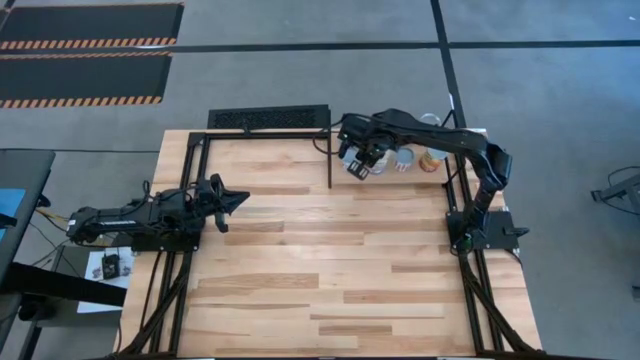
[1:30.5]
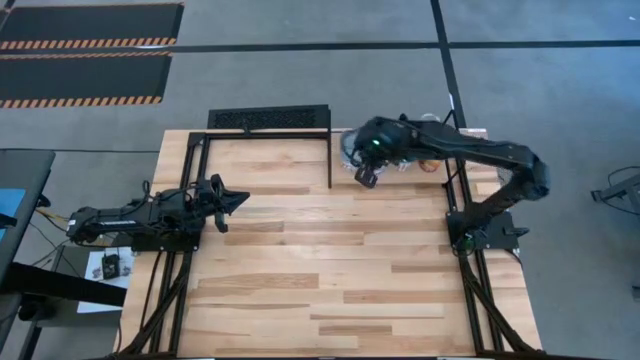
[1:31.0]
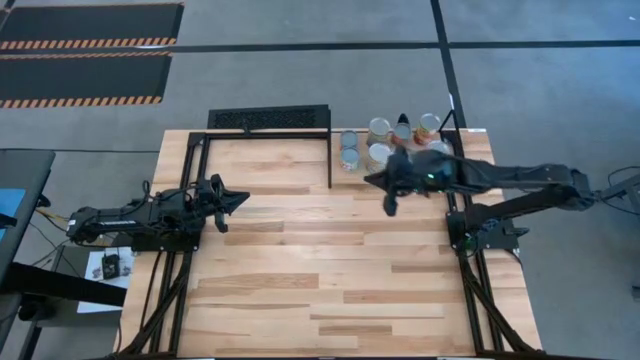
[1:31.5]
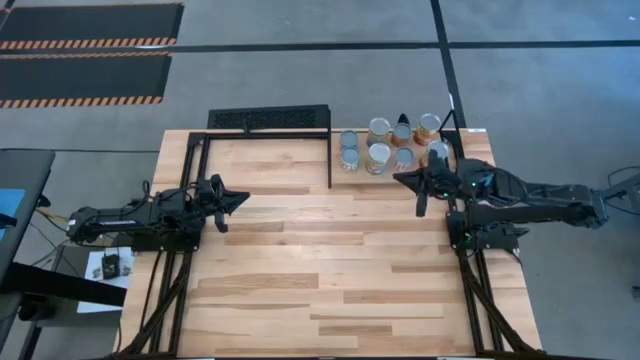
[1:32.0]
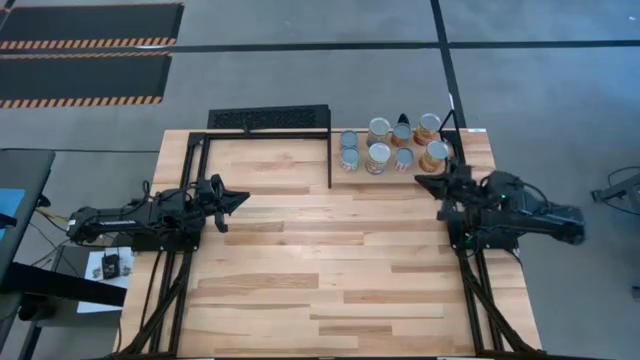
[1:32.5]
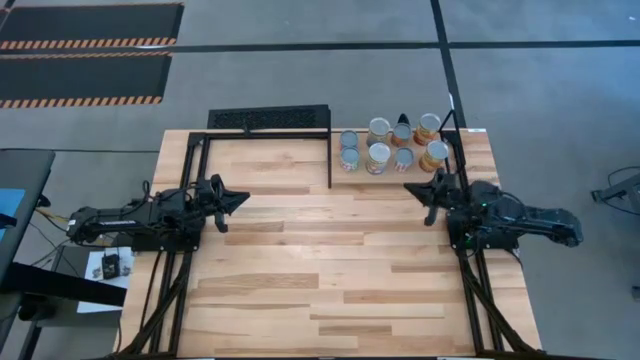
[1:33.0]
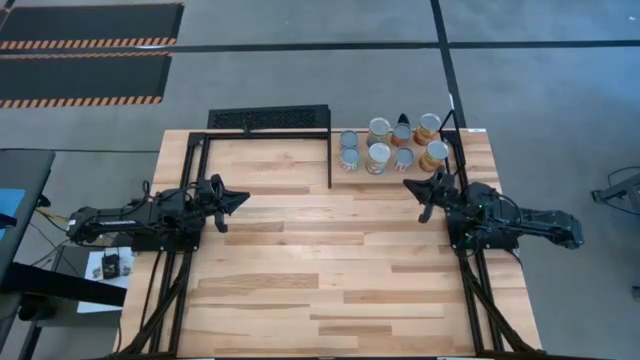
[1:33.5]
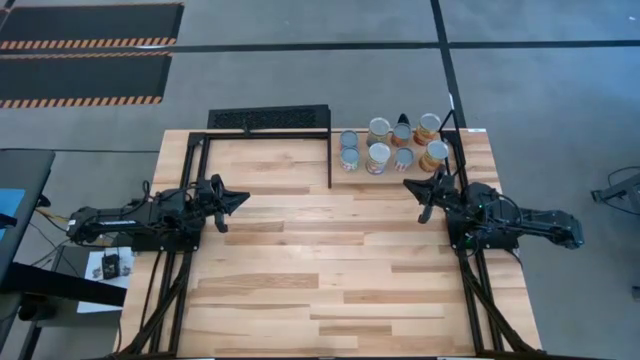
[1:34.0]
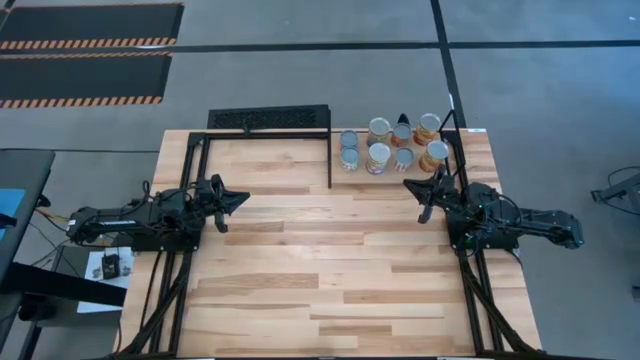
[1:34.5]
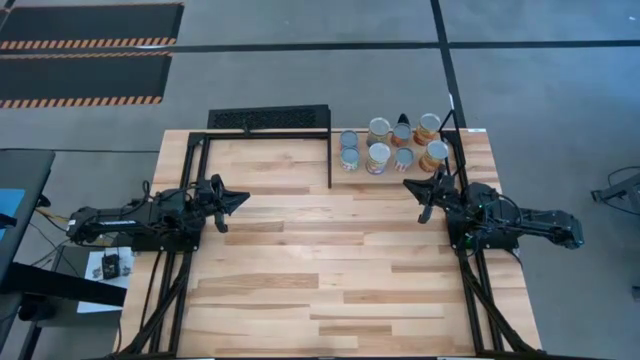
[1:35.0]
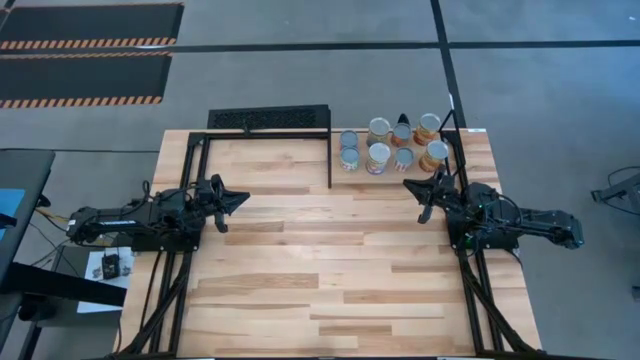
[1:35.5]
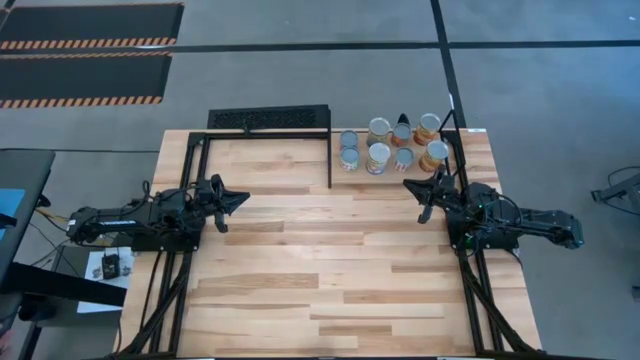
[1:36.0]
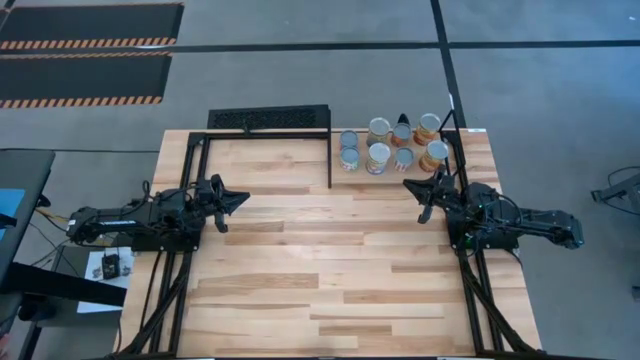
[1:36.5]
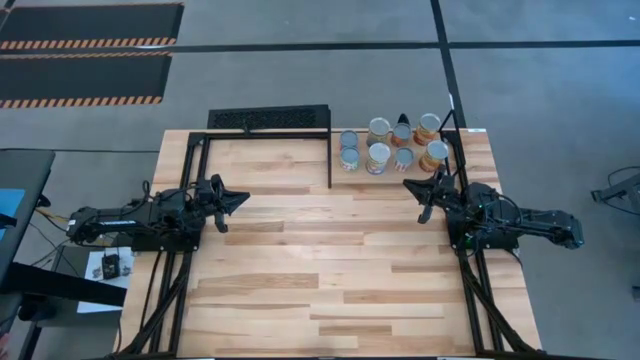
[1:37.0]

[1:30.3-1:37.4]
Task: Pick and place cans onto a shelf
Return to Home Position

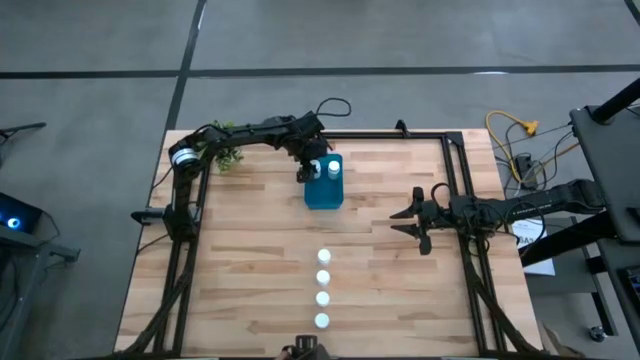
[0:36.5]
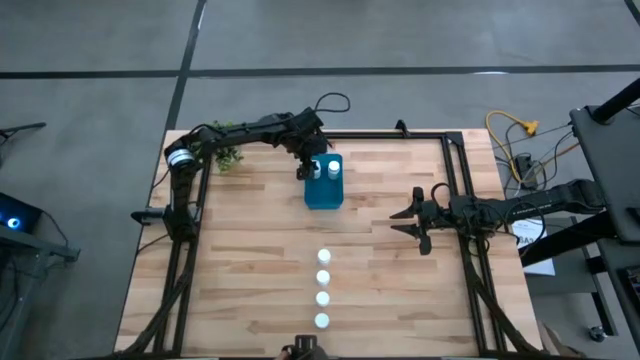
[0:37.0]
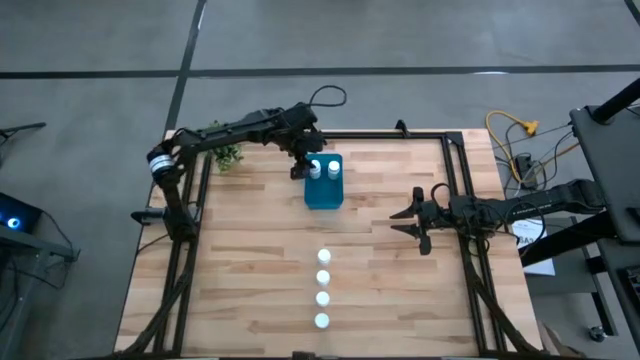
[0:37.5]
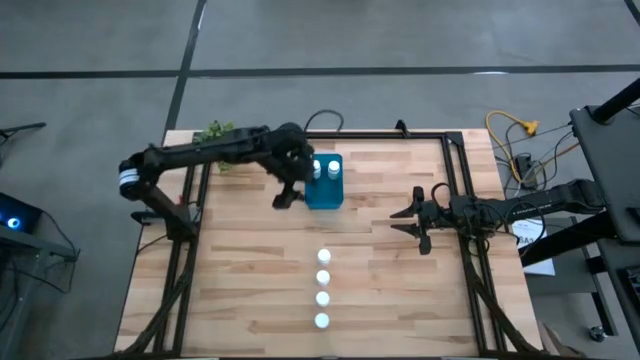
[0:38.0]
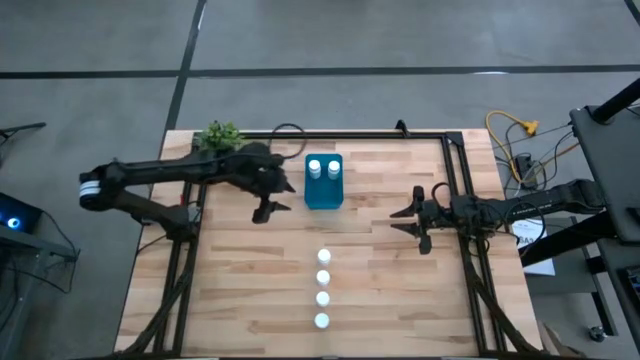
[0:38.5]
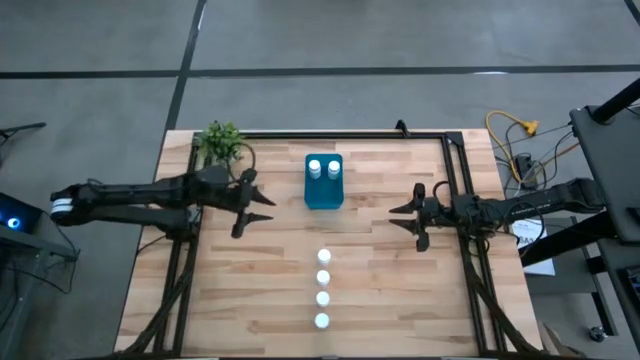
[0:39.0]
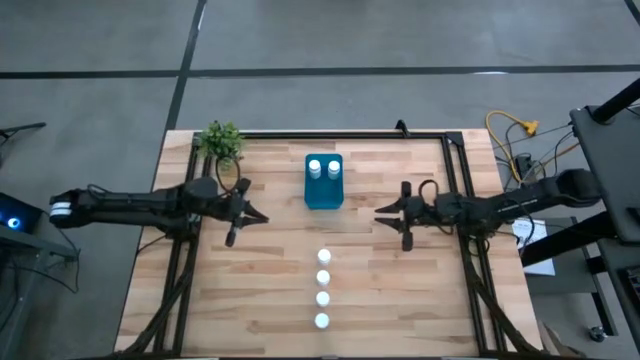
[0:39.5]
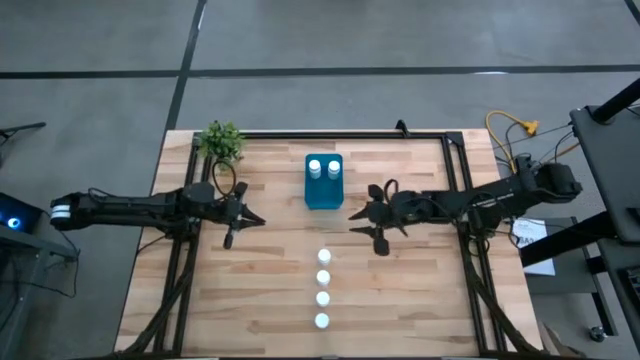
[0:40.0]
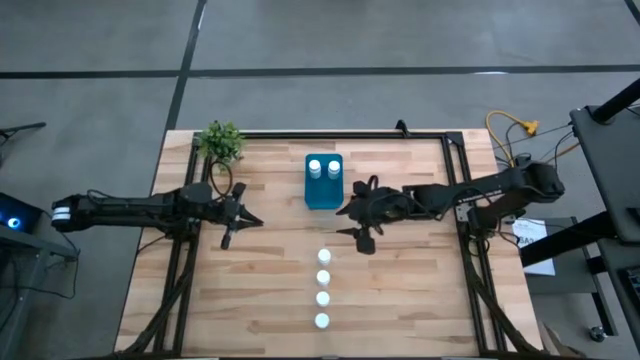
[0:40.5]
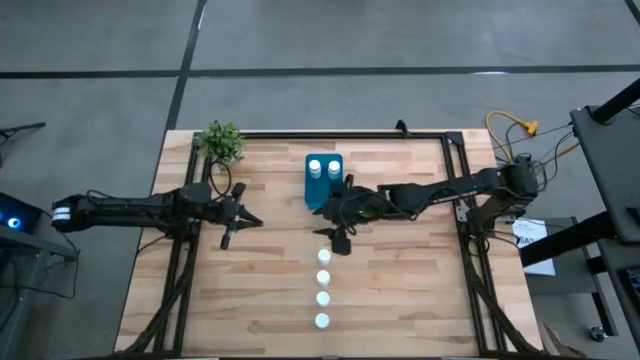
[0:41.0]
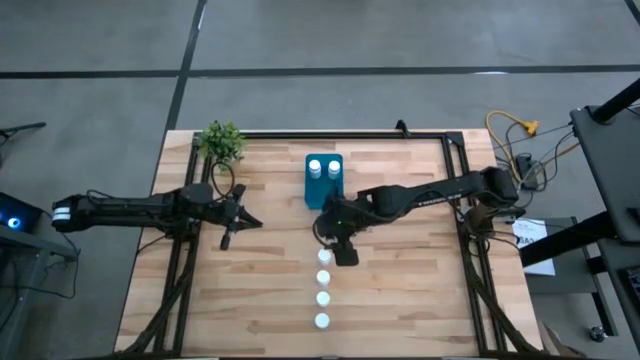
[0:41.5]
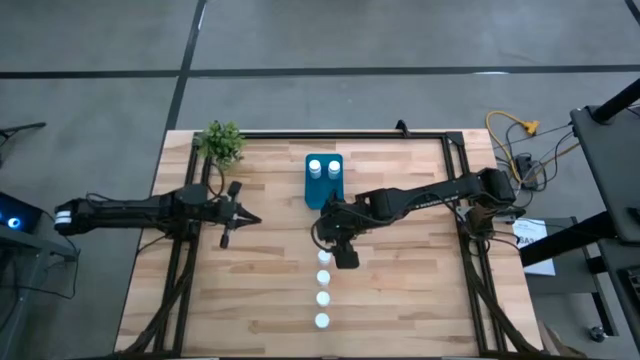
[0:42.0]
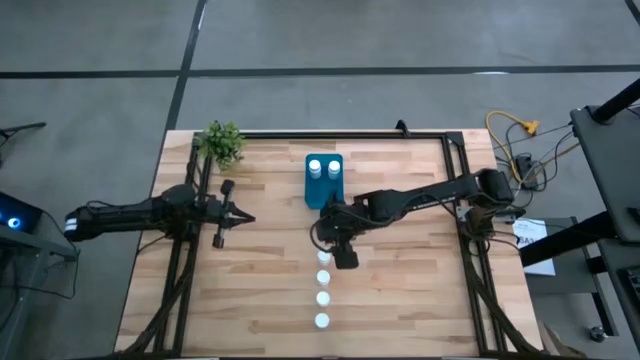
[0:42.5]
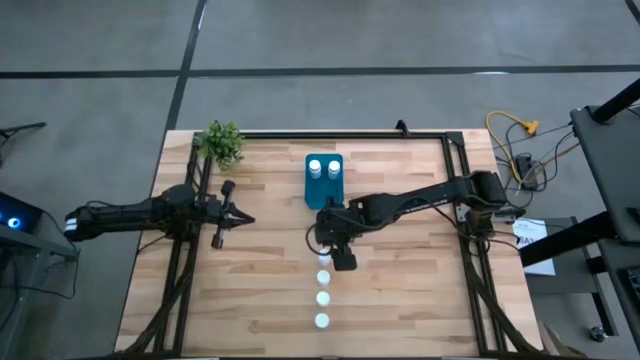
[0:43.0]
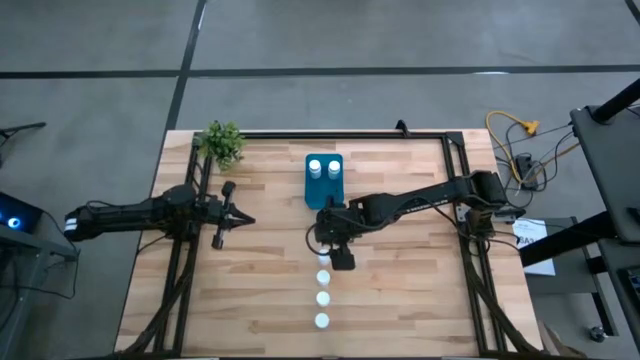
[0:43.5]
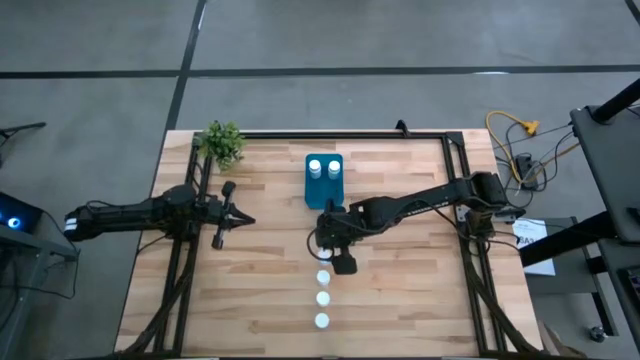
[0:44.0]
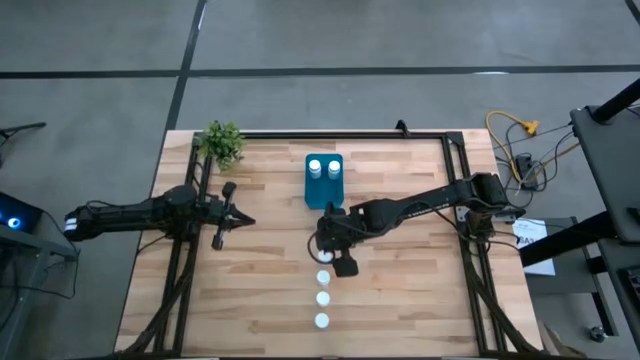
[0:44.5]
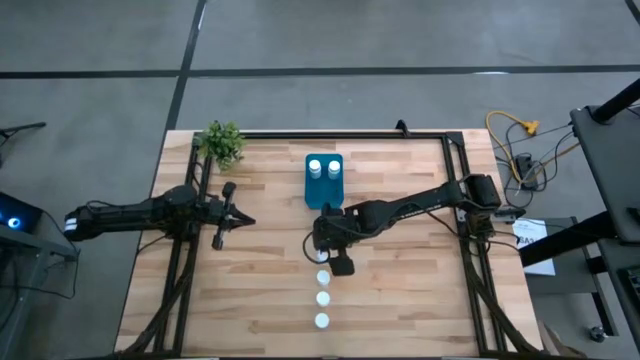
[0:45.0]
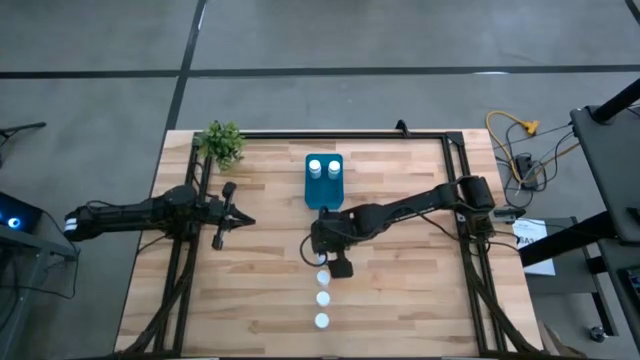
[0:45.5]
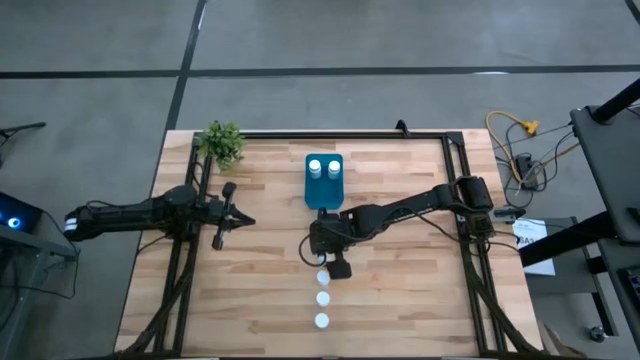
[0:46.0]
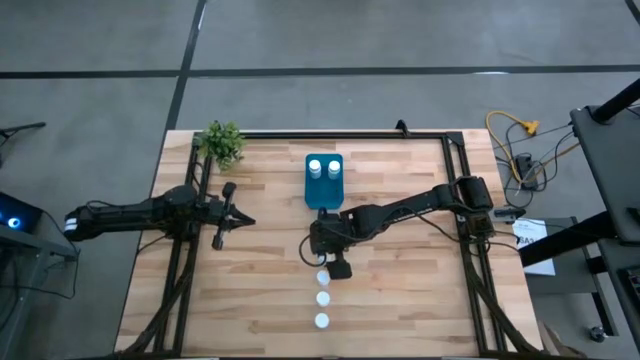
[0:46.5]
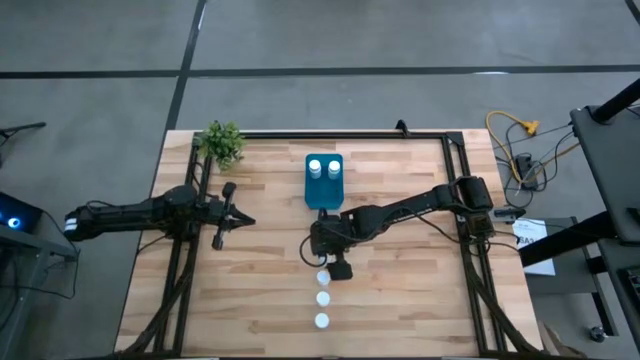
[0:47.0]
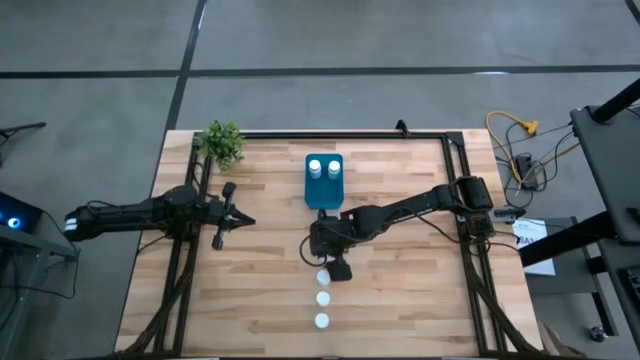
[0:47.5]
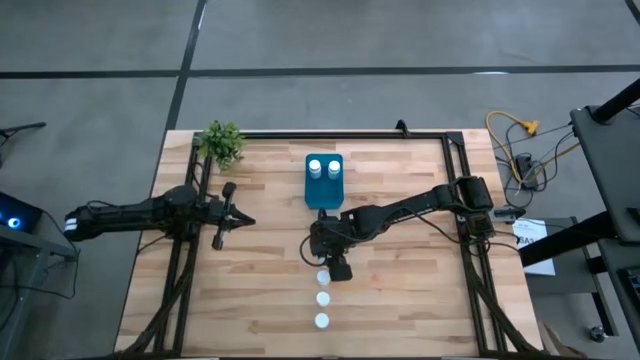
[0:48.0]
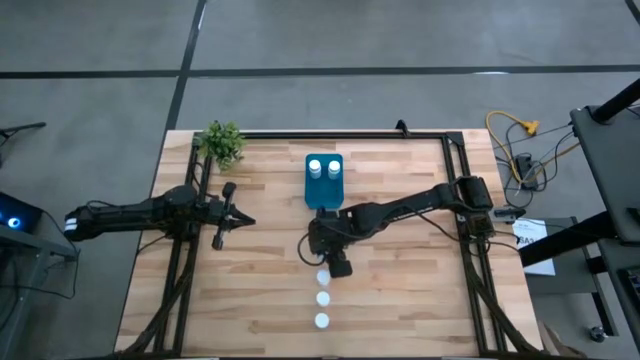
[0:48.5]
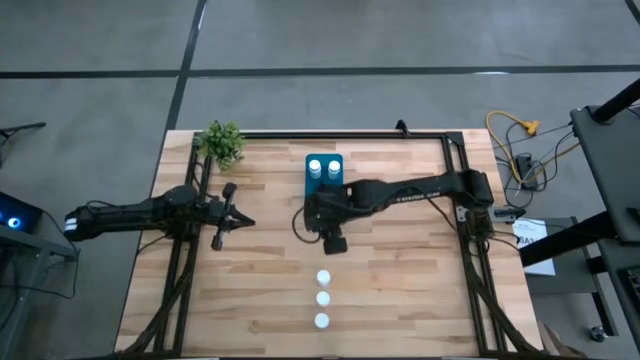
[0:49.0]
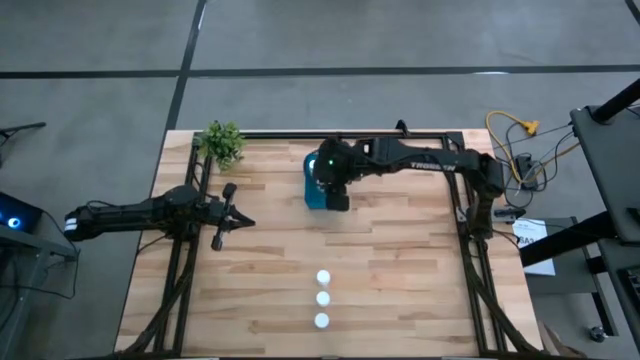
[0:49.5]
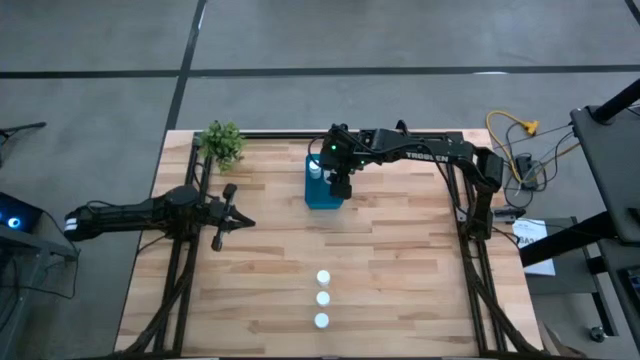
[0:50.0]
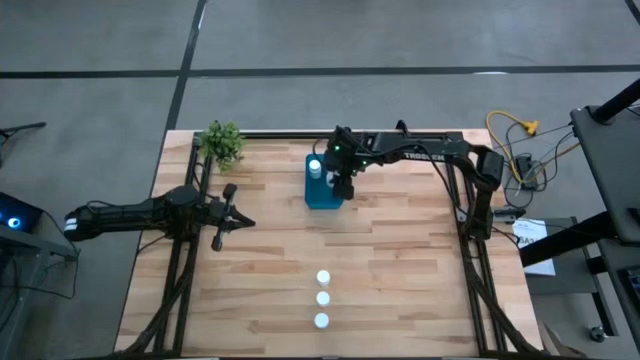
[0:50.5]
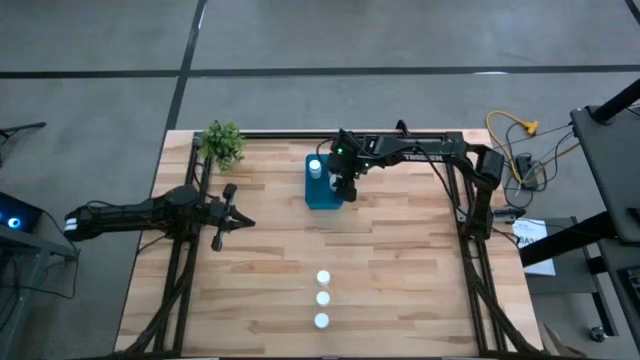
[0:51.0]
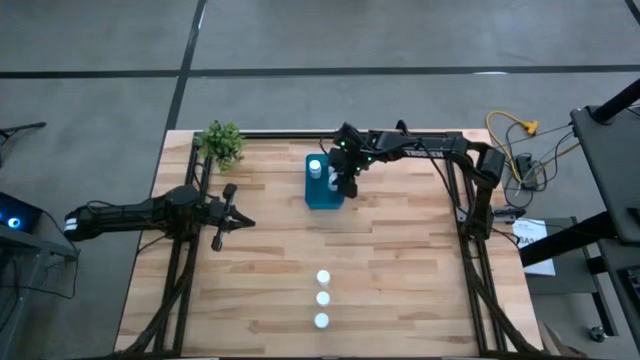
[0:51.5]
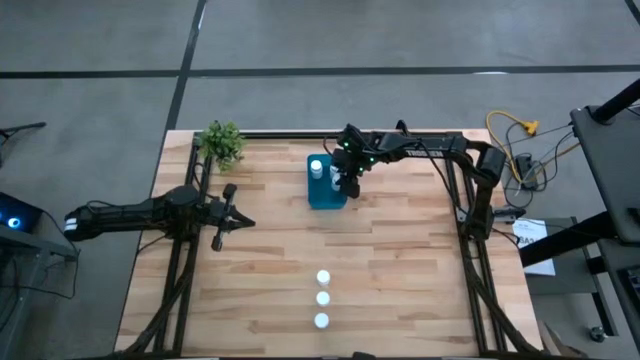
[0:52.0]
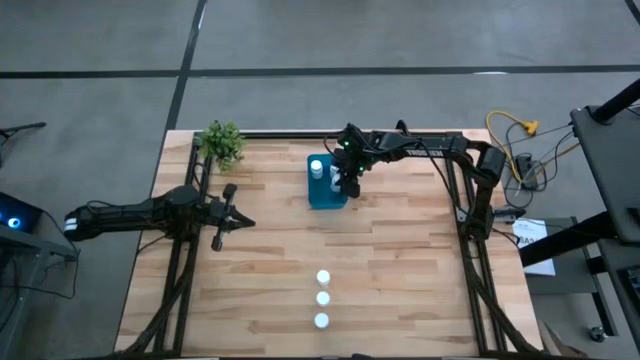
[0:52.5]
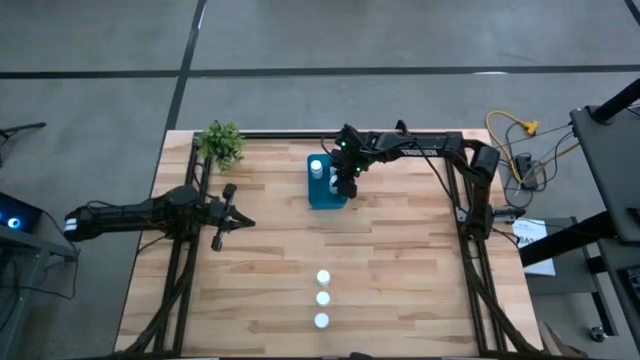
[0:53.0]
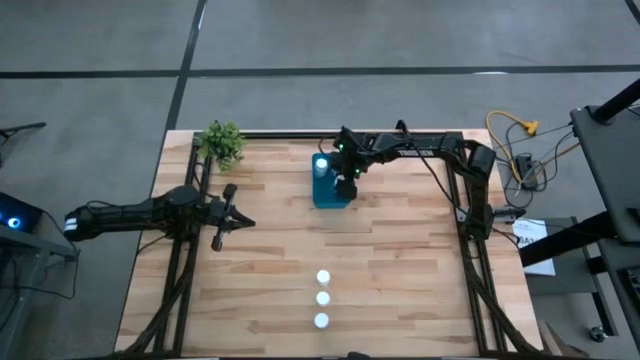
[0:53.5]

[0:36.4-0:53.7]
Task: Pick and place pill bottles into a basket
Put the white pill bottle into the blue bin
